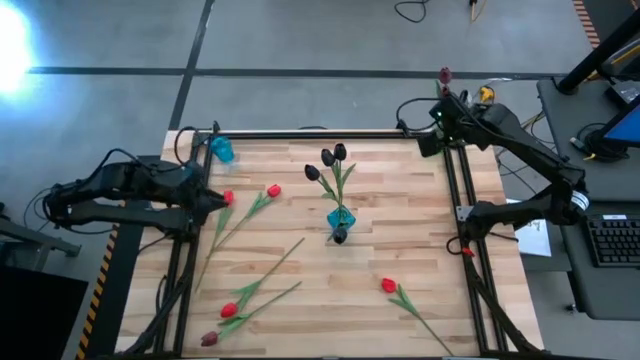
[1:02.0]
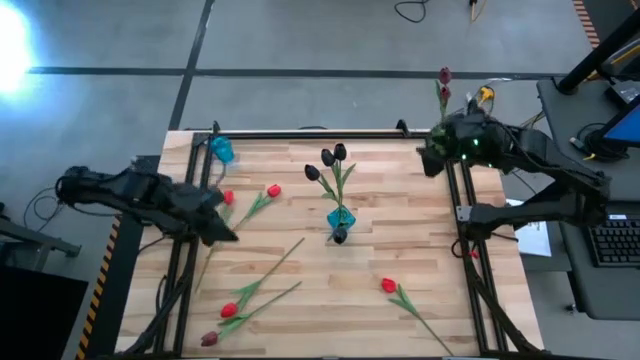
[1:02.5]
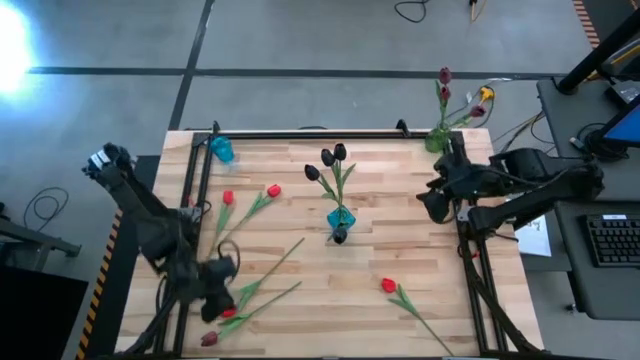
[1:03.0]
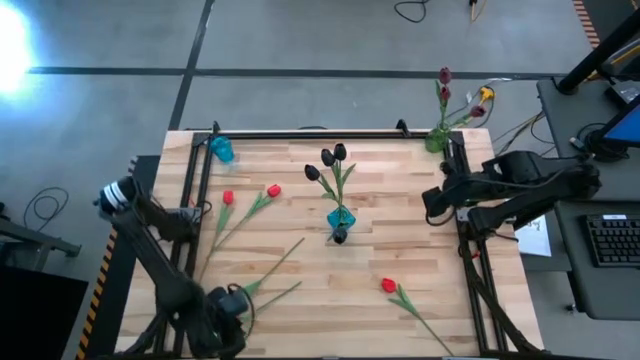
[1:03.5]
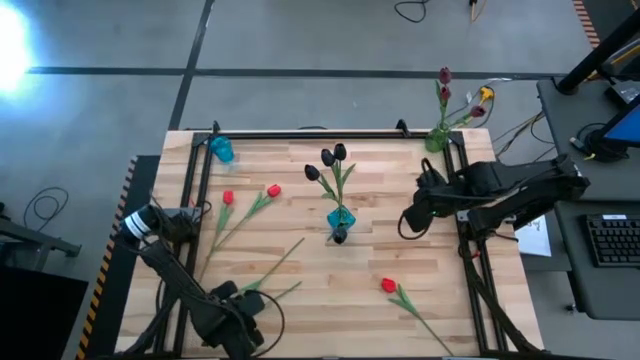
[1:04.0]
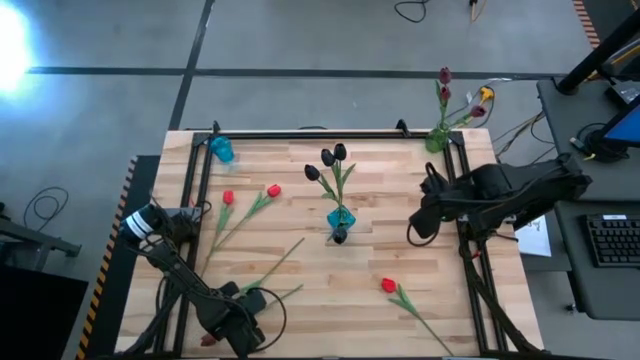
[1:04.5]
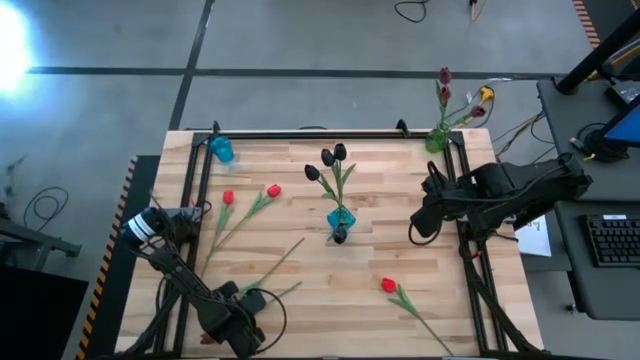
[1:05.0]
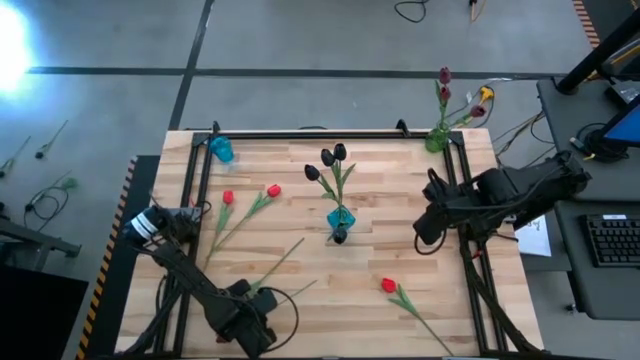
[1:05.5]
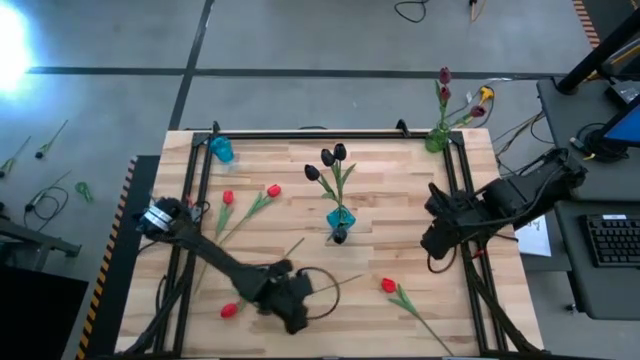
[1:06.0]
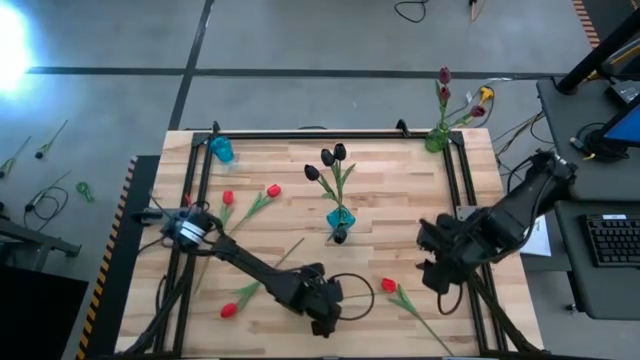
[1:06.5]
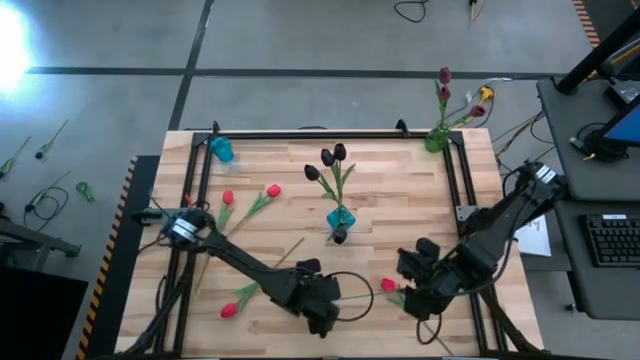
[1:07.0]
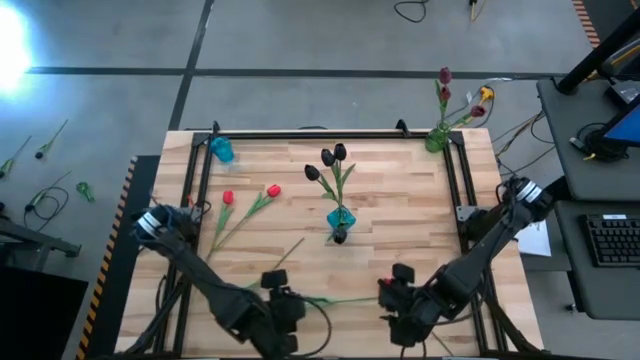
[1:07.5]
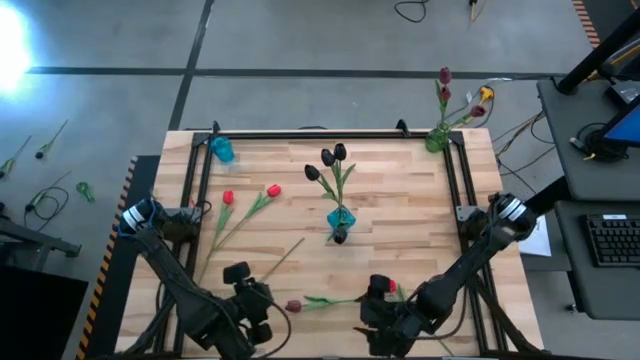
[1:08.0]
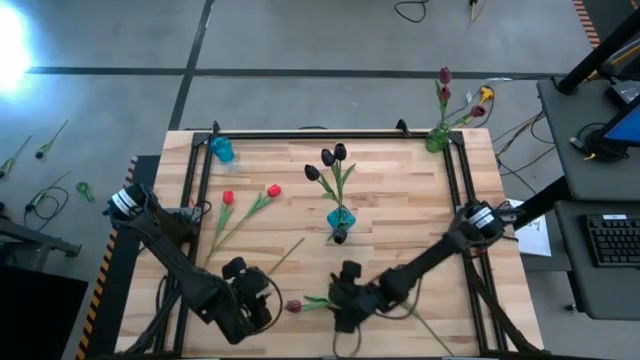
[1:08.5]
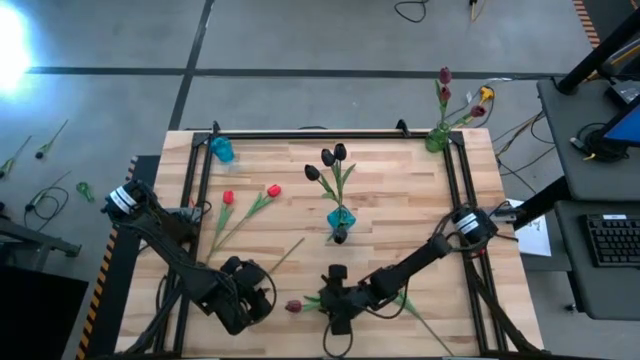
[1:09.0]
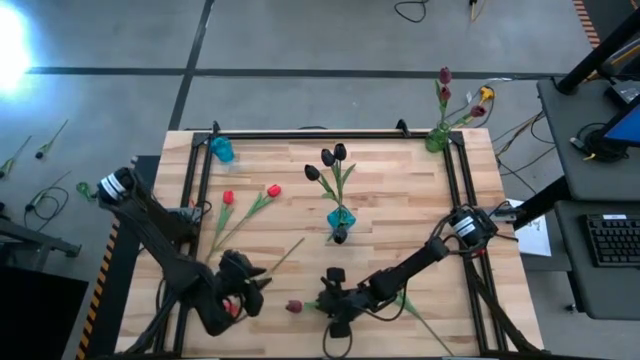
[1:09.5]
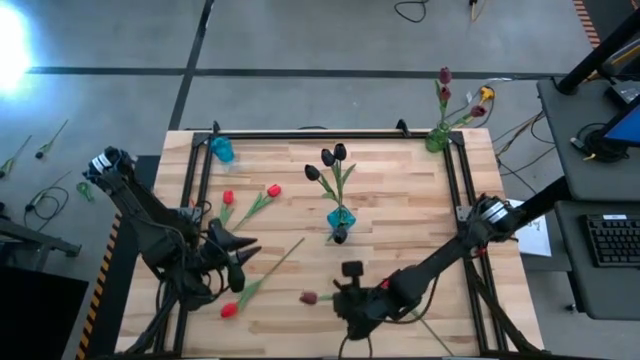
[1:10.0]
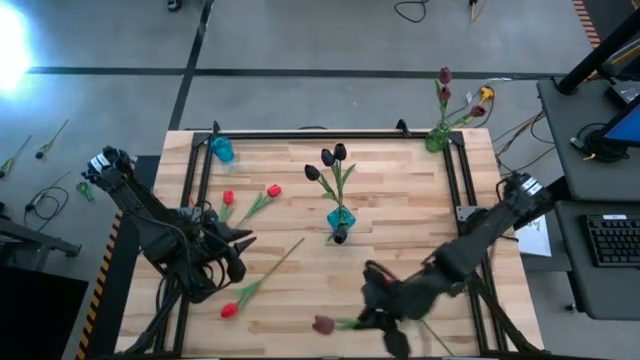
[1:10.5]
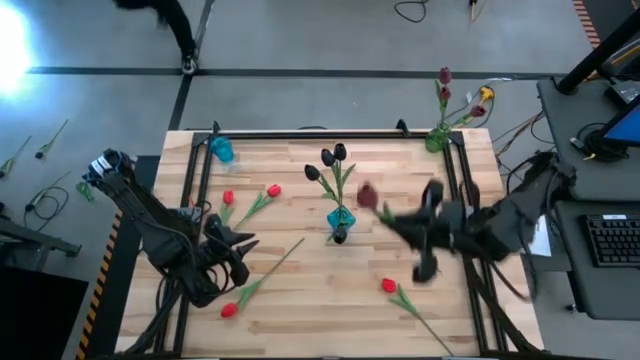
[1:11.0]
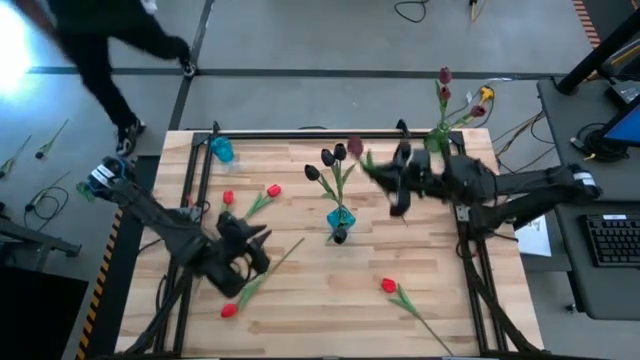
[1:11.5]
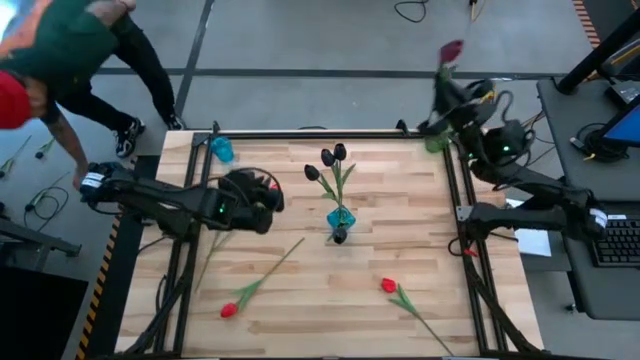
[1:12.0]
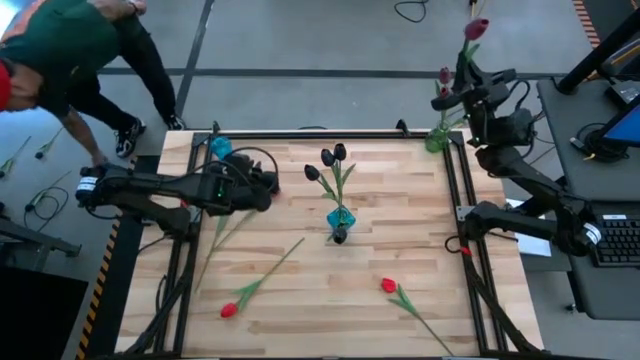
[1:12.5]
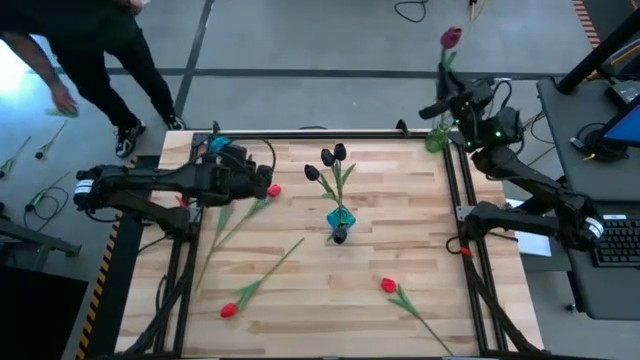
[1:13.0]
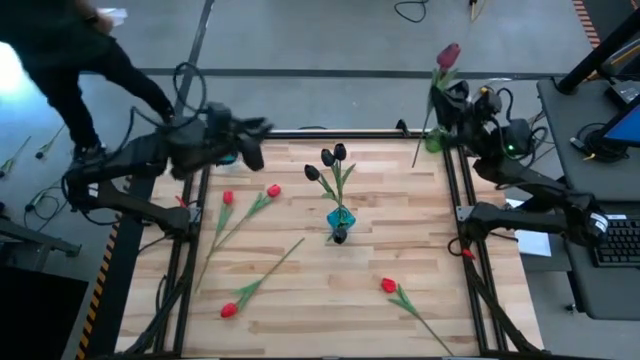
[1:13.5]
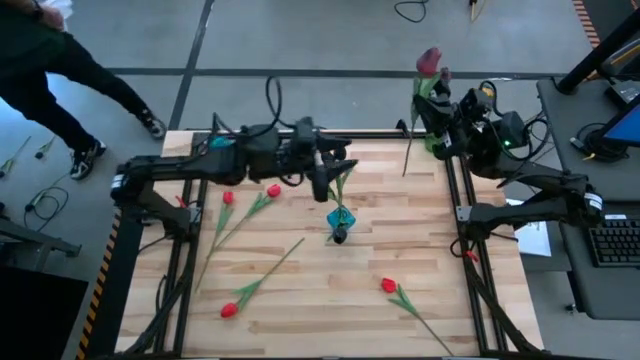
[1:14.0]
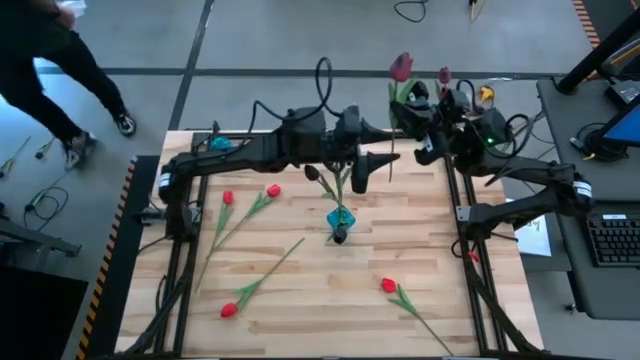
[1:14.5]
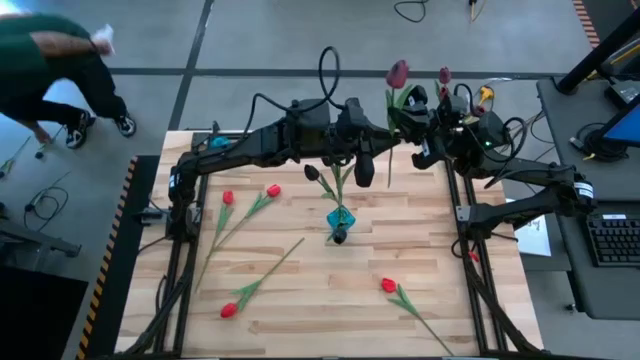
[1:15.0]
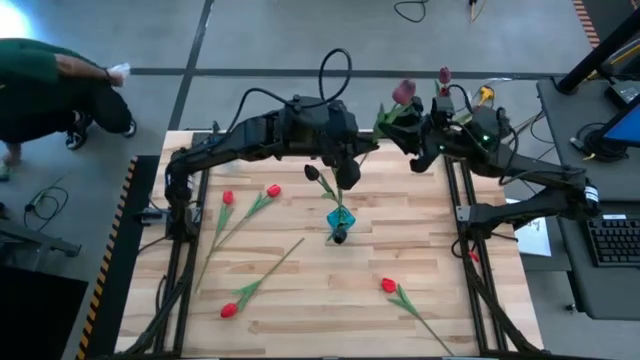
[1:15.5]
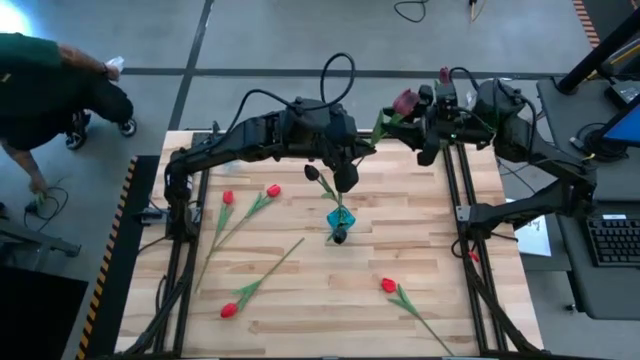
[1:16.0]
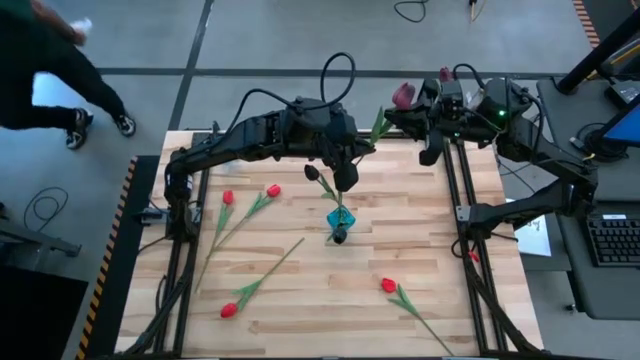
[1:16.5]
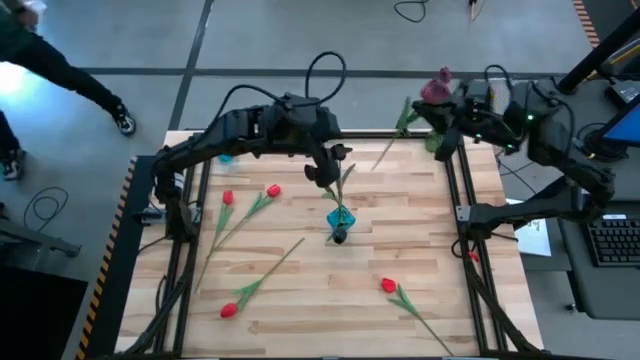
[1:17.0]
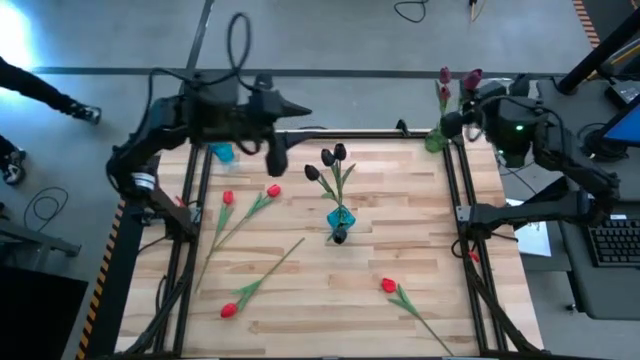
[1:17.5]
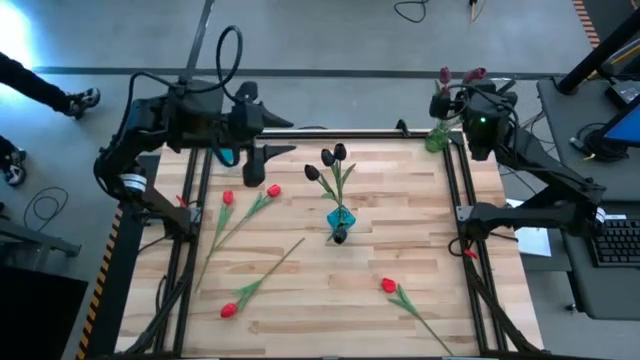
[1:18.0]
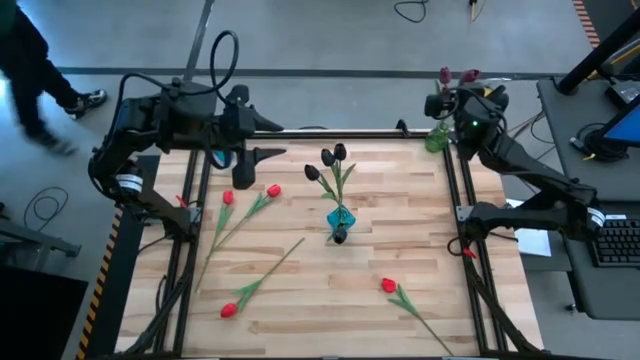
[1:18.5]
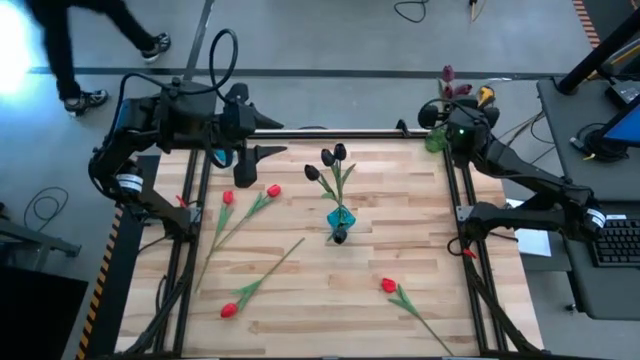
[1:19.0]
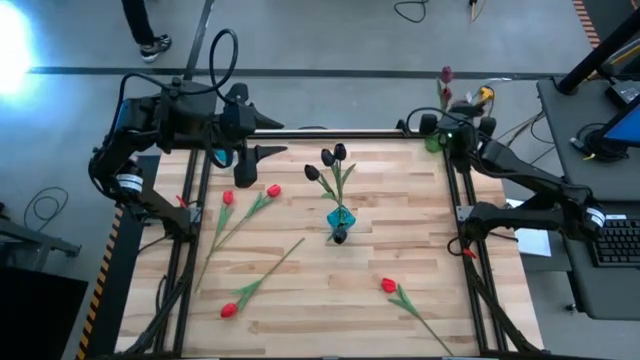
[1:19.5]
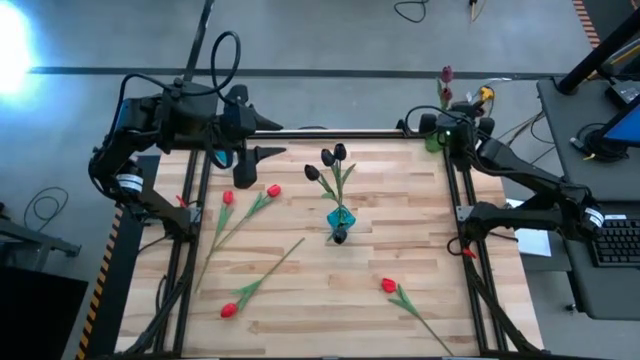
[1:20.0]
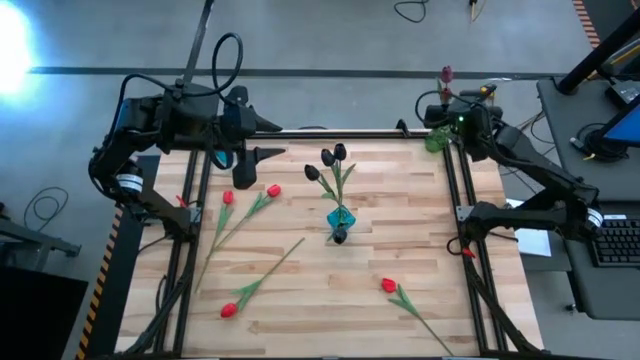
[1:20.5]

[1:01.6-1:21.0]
Task: Sort flowers into vase by color
Put the dark red flower into the green vase

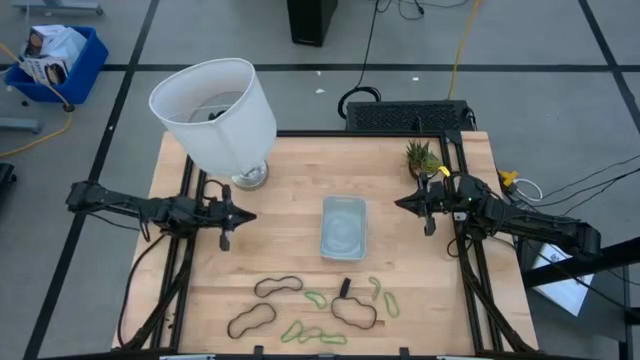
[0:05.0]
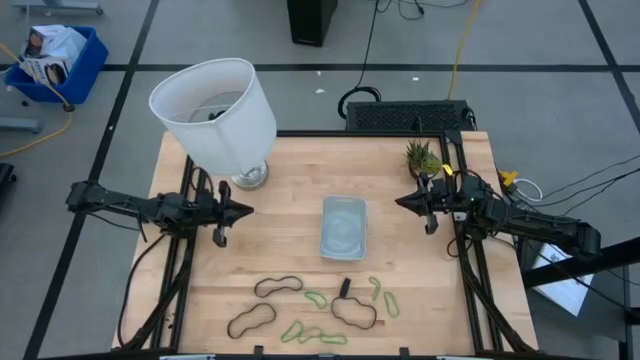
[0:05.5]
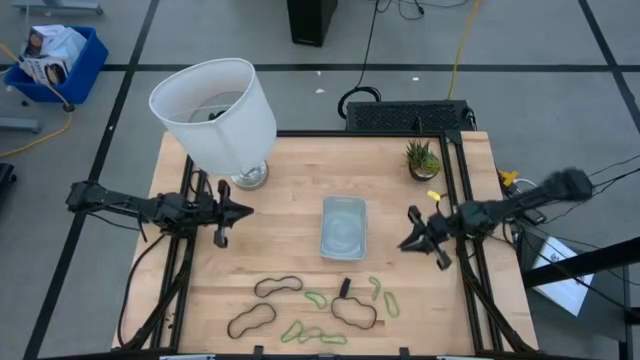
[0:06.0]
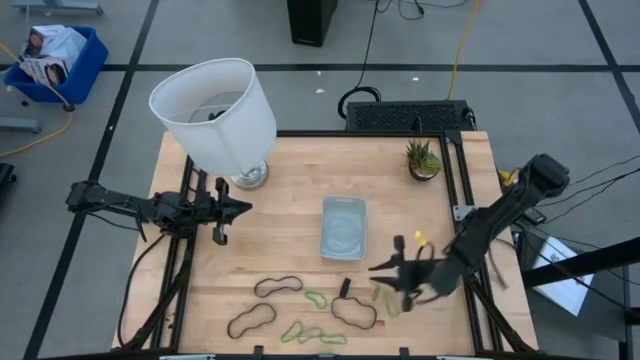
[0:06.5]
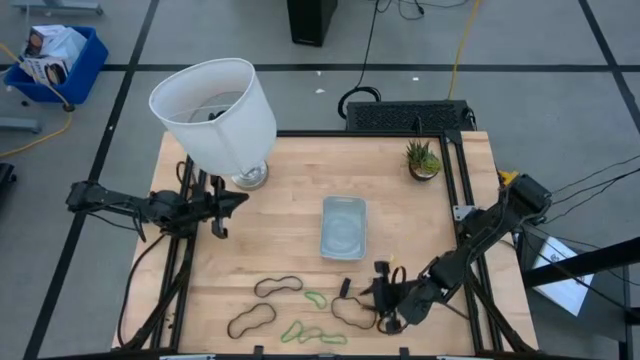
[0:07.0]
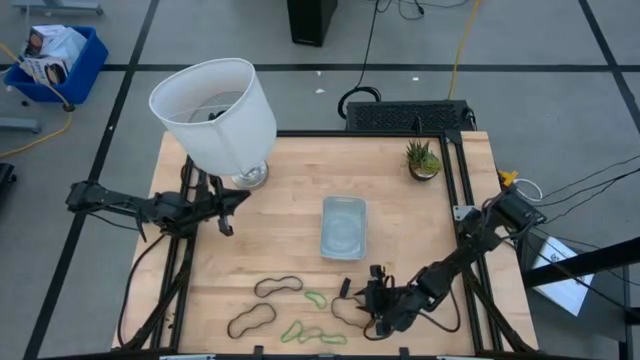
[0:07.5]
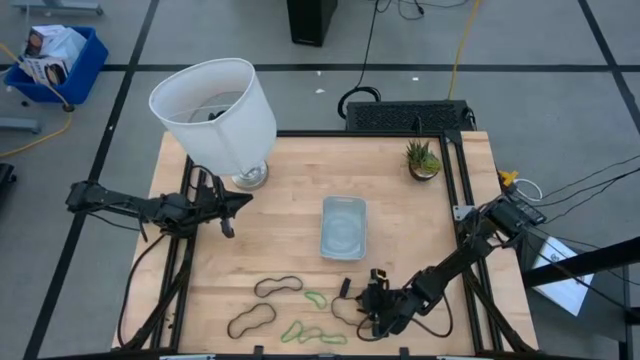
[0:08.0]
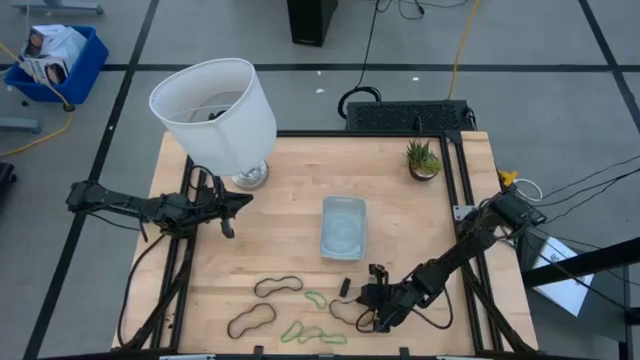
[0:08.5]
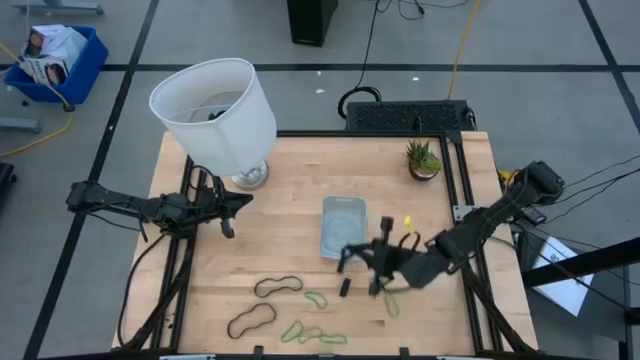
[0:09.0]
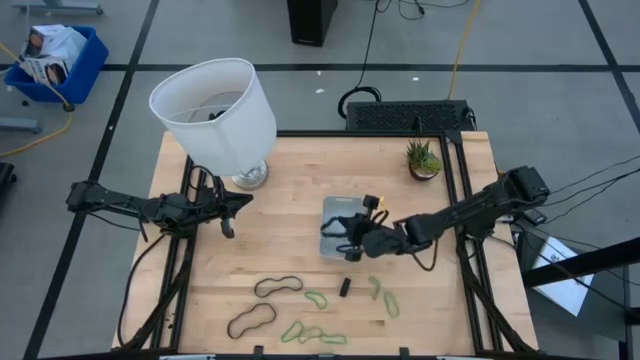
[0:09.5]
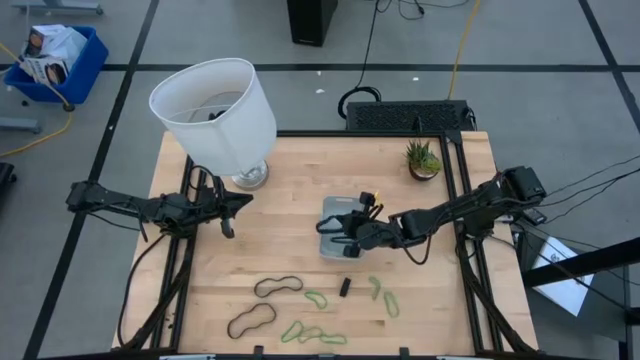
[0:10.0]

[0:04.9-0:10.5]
Task: Pick and place rubber bands into bin
Put the black rubber band into the gray container
